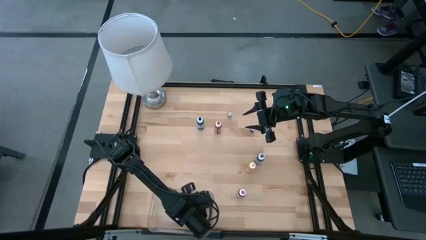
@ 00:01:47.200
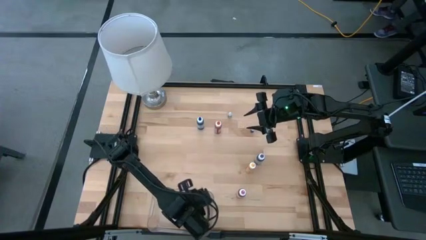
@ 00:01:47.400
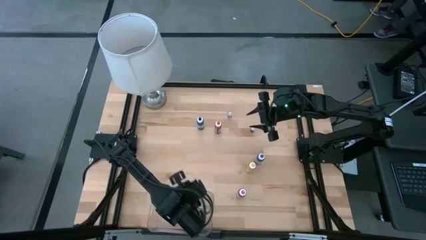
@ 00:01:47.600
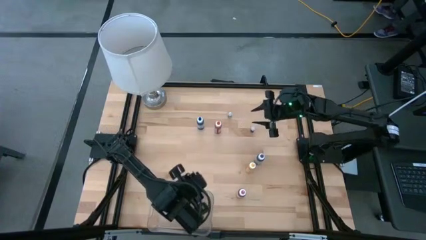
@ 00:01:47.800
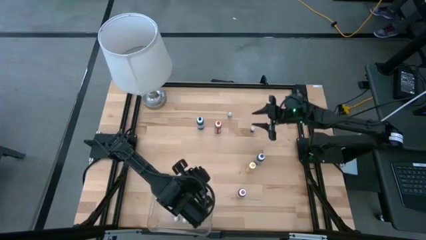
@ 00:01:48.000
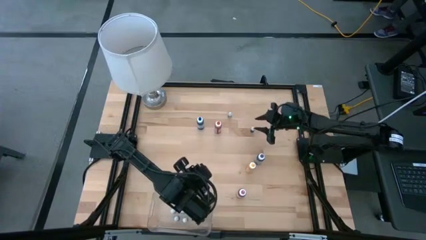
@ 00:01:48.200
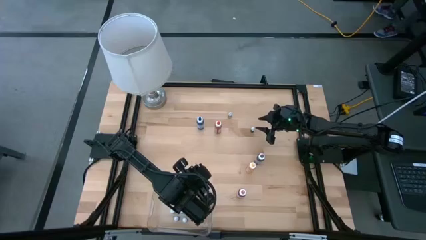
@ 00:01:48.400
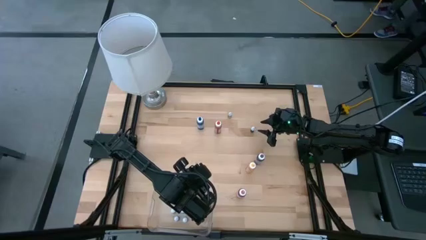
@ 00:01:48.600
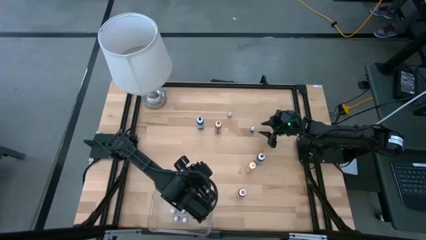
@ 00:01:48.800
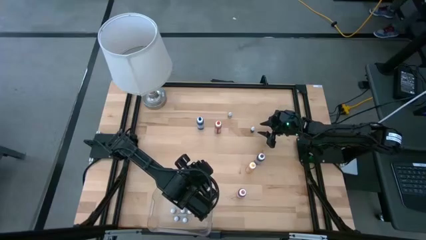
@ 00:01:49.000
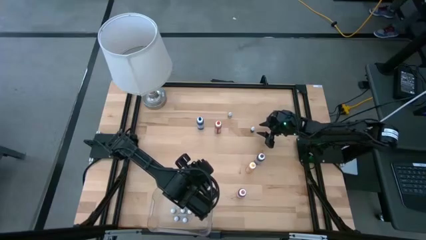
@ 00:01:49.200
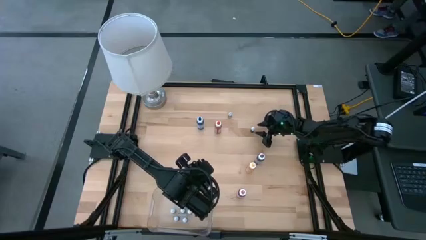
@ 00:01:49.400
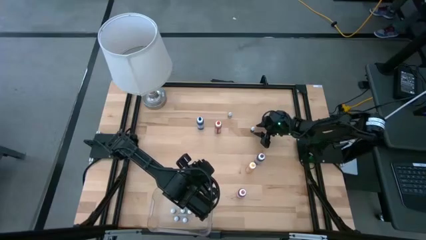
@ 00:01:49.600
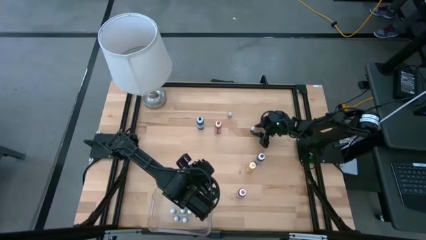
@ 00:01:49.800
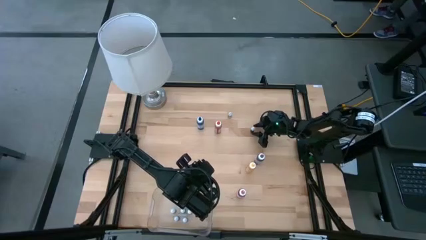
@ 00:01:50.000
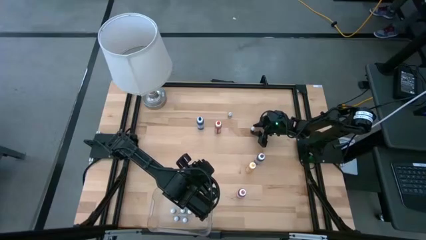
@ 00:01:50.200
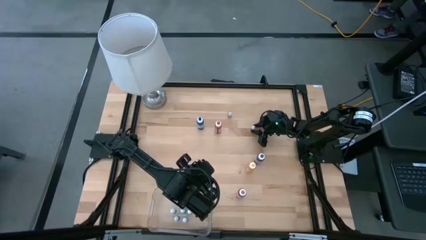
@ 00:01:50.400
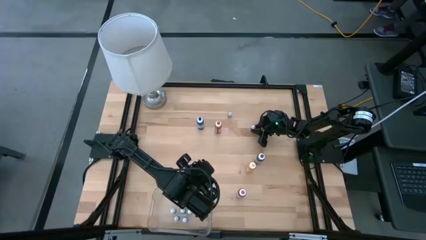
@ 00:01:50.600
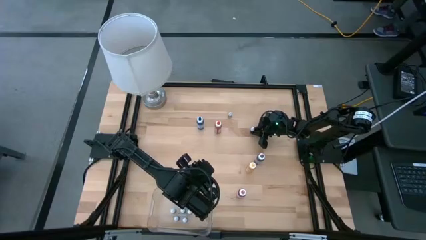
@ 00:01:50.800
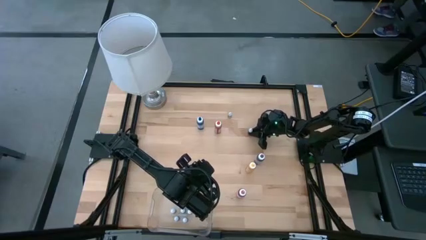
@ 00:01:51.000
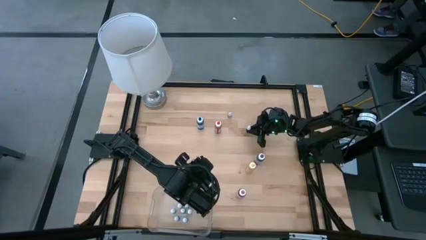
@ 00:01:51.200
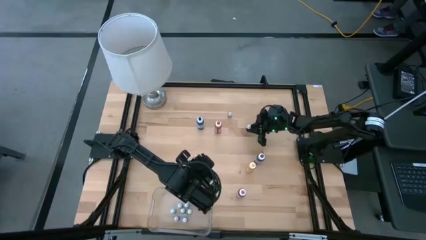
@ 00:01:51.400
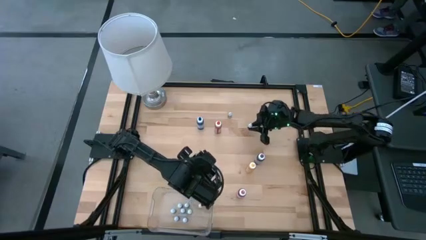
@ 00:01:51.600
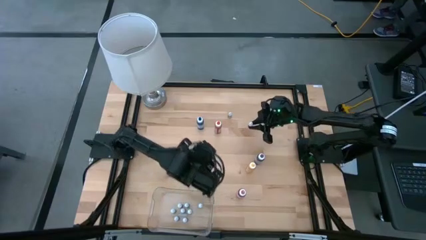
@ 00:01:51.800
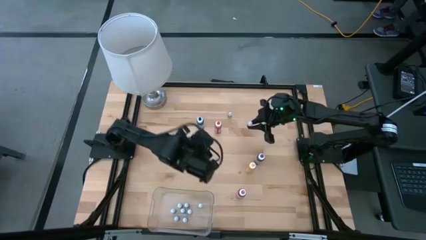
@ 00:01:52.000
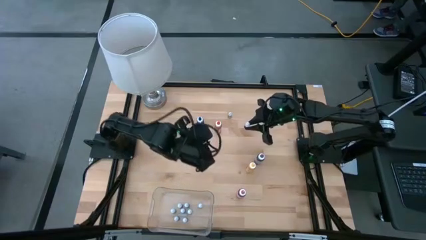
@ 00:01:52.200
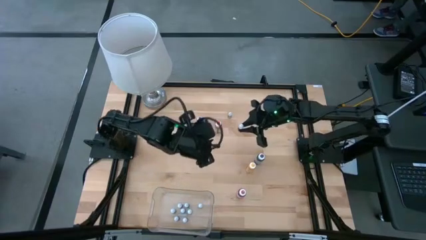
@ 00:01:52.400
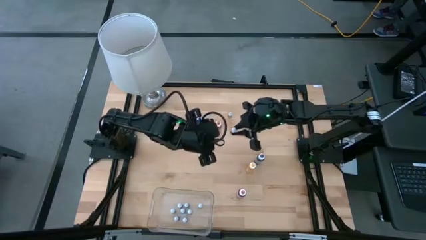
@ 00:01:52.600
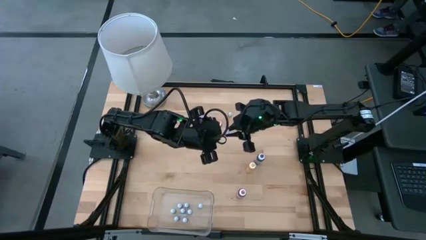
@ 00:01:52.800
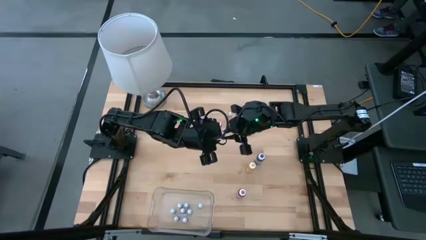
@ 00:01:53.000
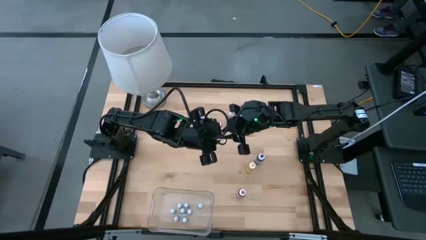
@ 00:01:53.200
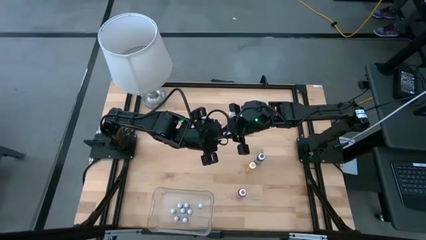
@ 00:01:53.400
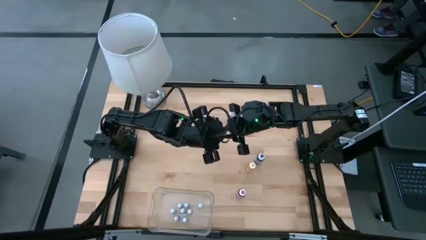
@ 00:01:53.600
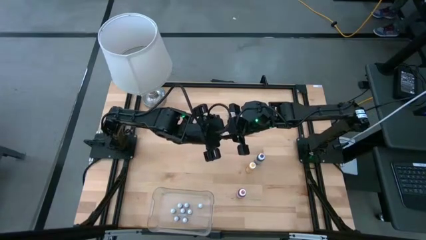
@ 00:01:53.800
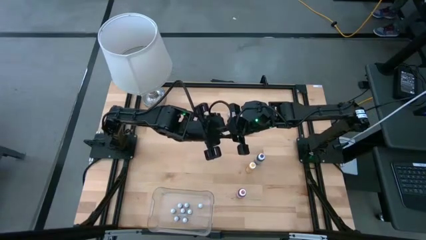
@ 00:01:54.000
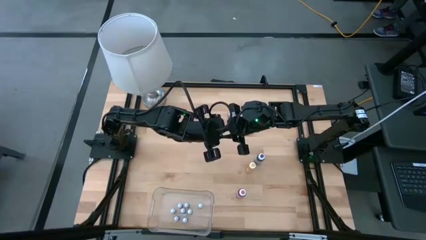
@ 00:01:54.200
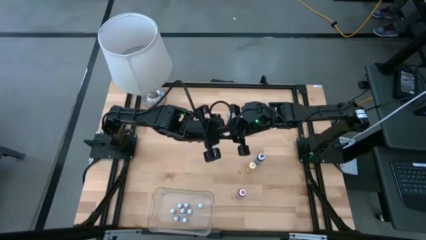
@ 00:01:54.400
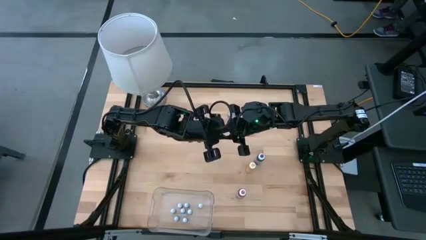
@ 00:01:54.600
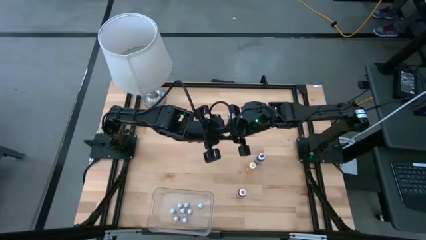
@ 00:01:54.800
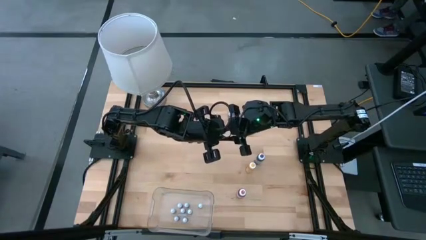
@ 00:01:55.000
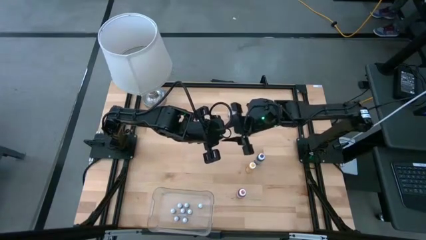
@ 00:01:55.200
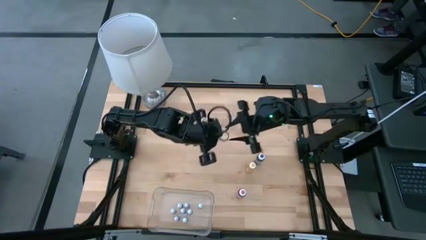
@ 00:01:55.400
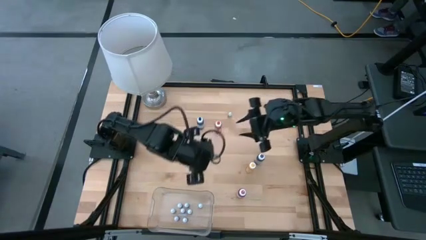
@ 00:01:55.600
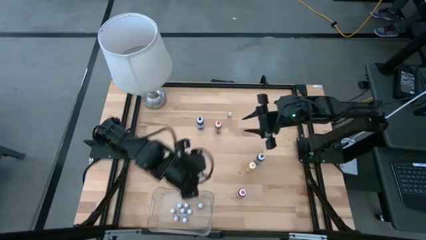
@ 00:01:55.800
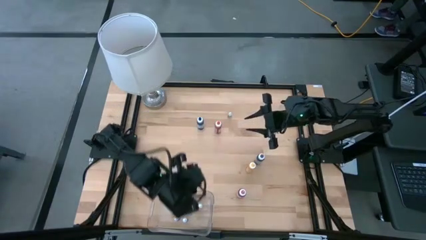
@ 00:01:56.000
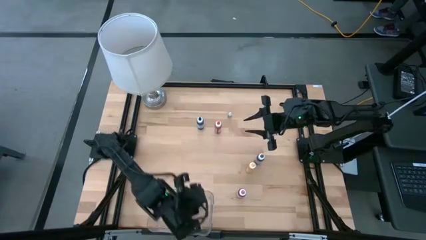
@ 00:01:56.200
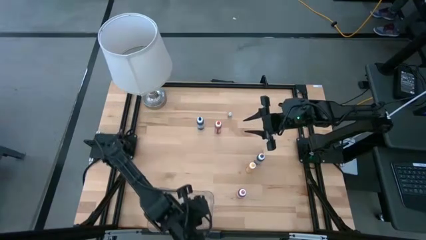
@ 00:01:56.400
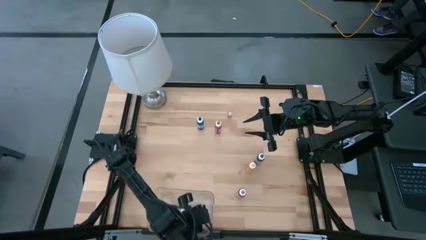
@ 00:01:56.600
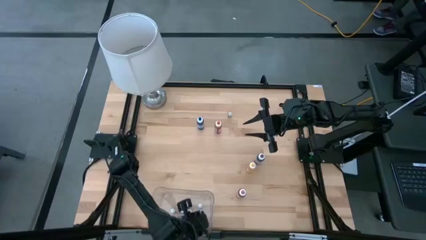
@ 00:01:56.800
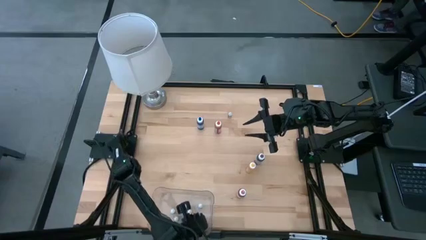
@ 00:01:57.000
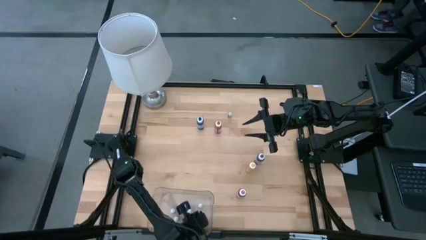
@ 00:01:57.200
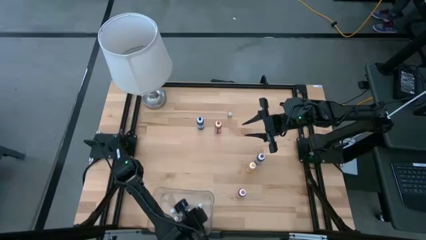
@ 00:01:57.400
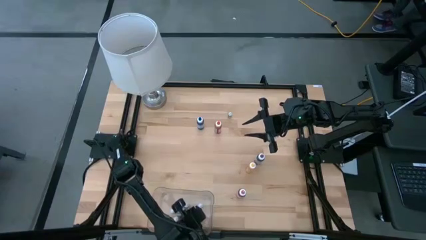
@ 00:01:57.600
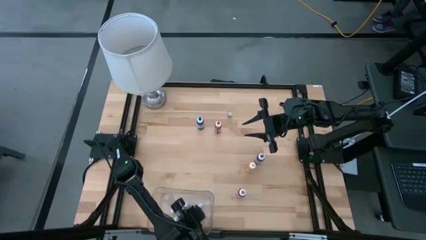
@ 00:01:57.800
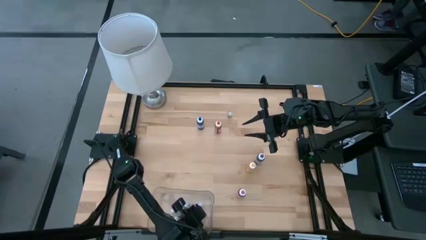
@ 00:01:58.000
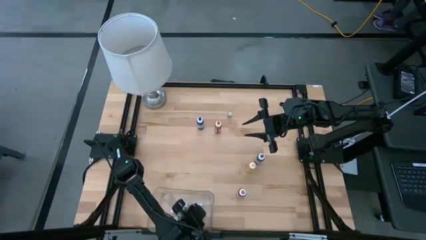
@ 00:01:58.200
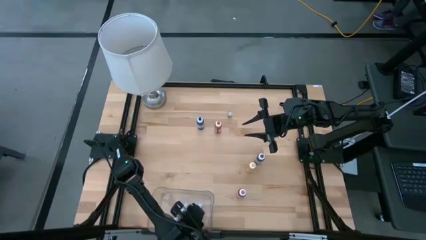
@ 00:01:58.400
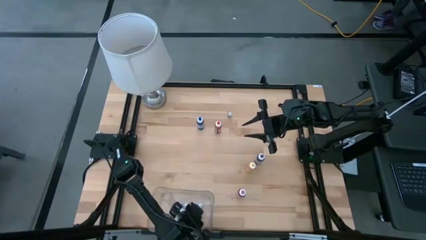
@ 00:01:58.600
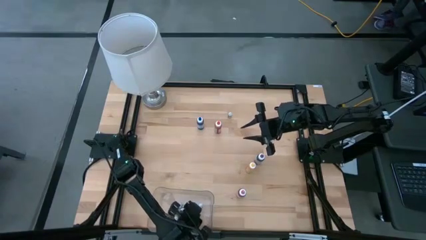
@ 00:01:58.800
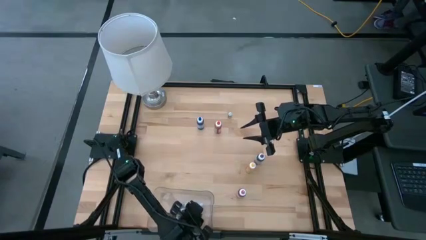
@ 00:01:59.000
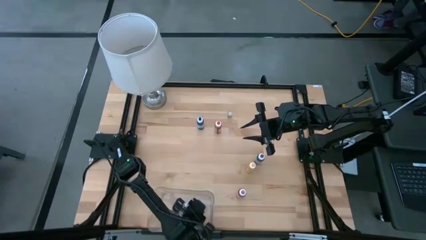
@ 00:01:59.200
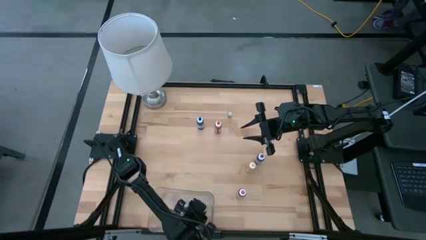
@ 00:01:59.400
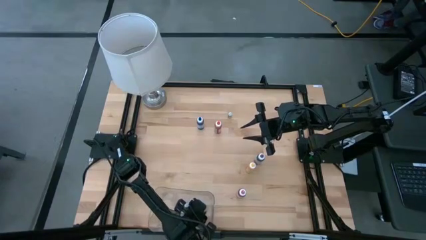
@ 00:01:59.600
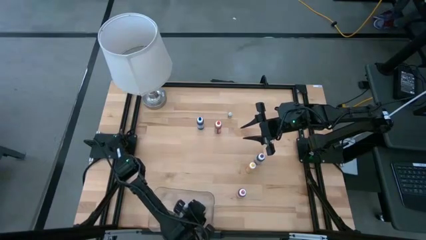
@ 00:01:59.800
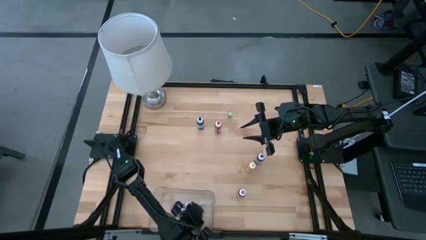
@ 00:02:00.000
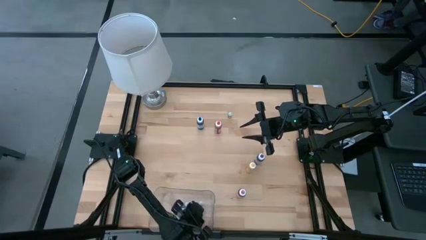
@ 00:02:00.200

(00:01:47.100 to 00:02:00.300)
Task: Pick & Place food coloring
Put the small pink food coloring bottle into the bin

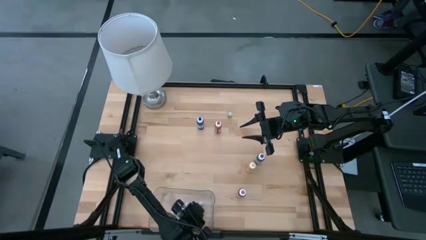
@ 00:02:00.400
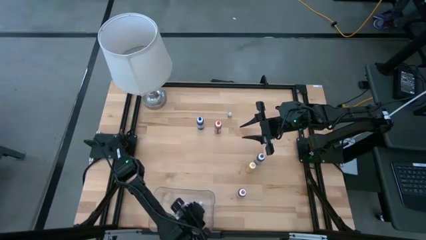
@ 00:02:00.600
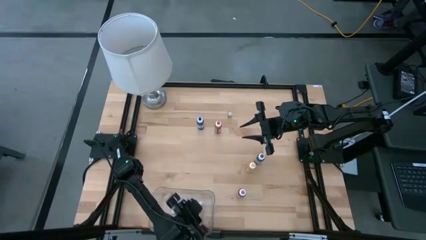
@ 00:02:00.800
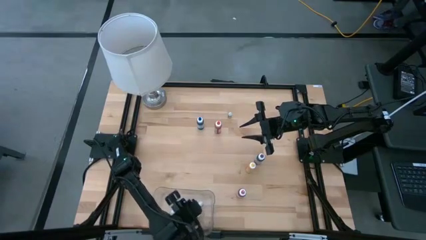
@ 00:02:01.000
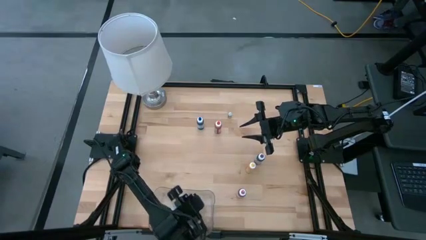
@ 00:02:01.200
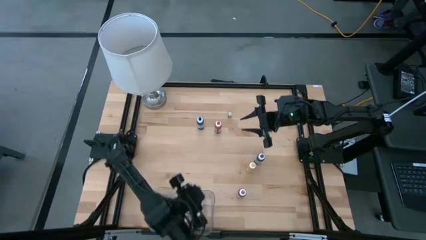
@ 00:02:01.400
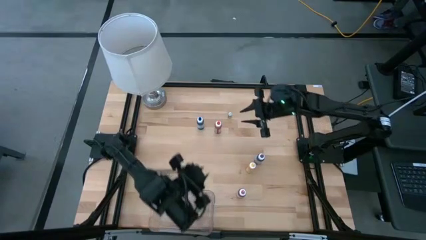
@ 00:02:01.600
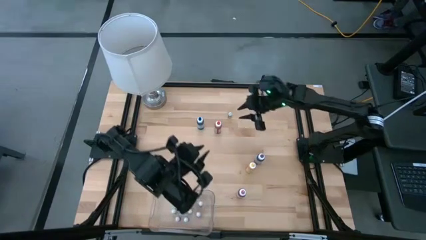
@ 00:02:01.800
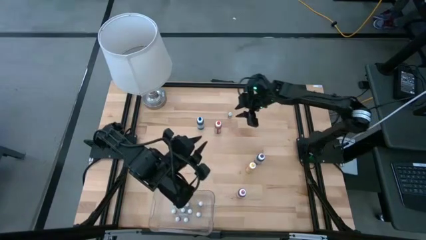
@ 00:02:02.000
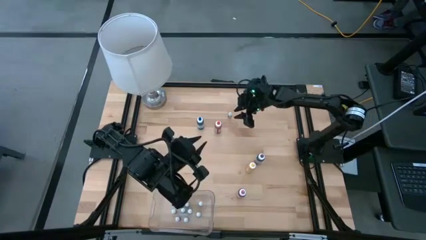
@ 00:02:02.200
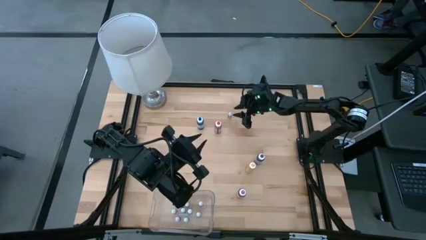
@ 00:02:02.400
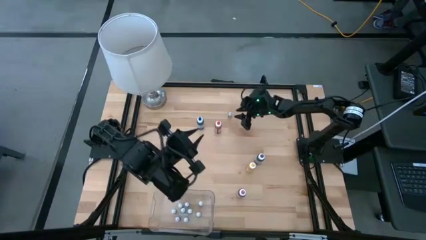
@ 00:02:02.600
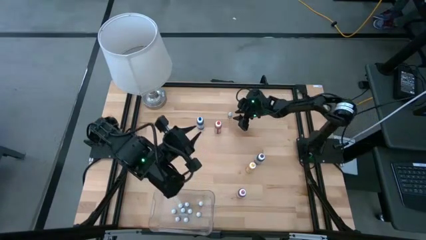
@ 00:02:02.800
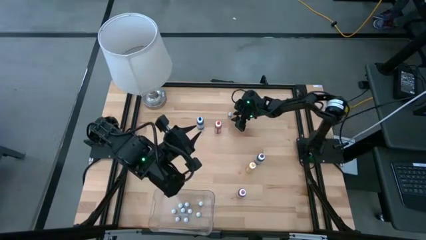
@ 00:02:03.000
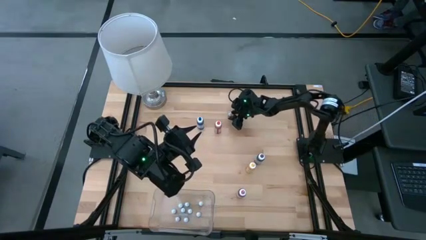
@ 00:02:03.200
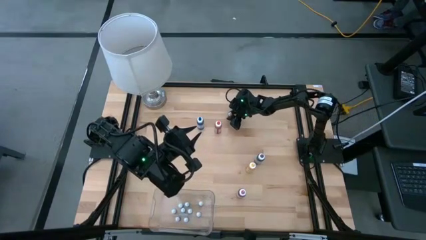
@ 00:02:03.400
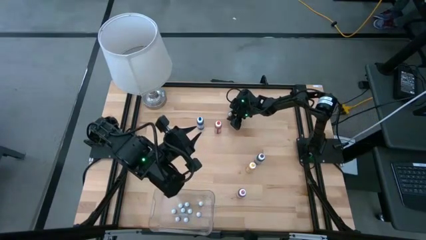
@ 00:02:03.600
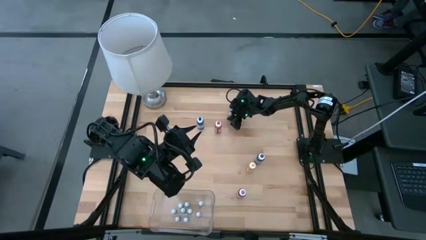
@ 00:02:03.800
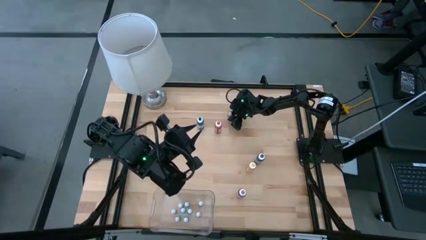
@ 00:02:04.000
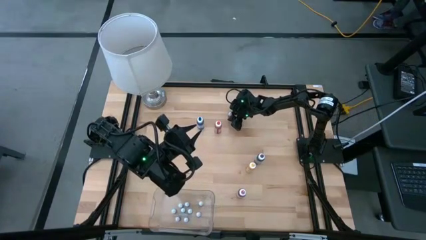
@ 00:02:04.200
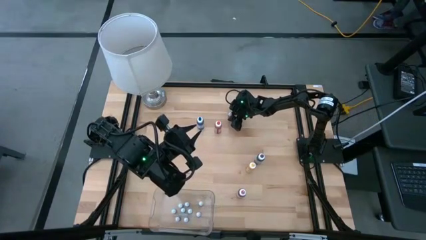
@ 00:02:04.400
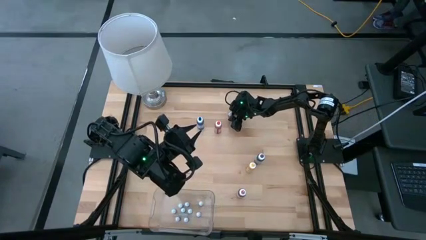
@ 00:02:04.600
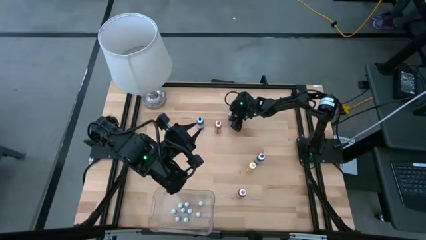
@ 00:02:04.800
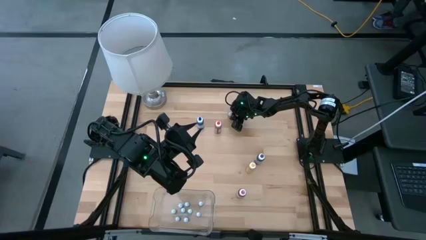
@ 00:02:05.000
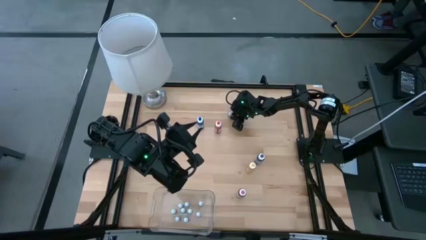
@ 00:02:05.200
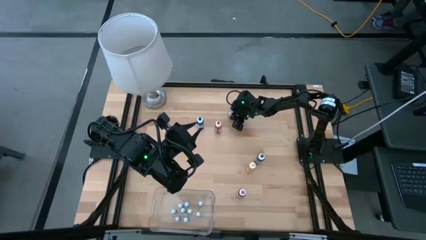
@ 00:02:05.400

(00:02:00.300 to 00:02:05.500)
Put the small green food coloring bottle into the bin
